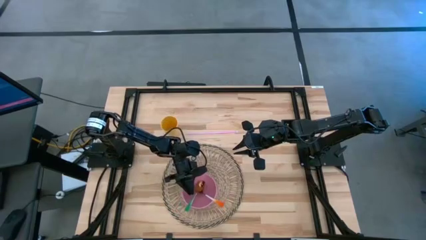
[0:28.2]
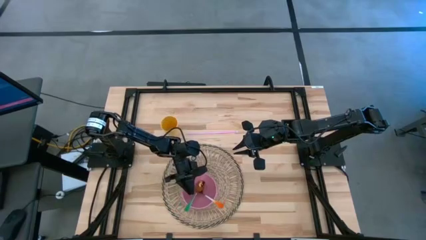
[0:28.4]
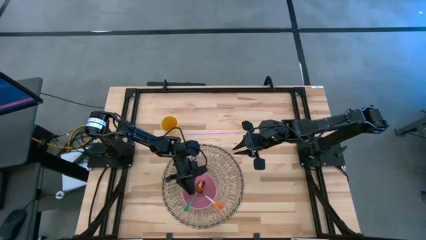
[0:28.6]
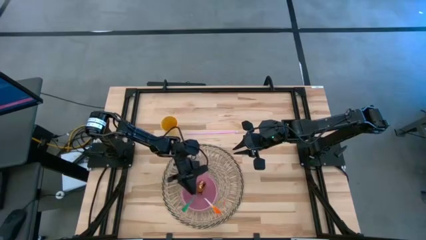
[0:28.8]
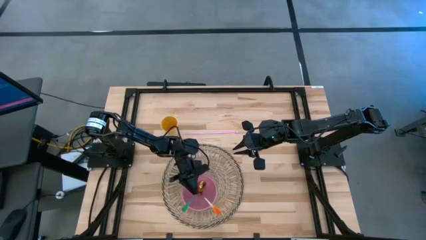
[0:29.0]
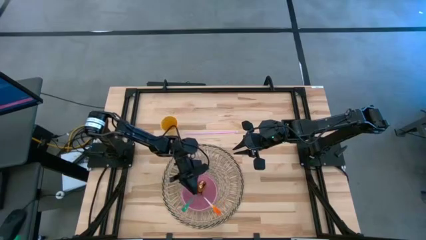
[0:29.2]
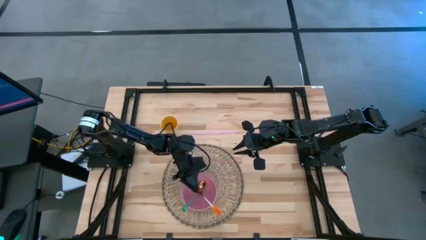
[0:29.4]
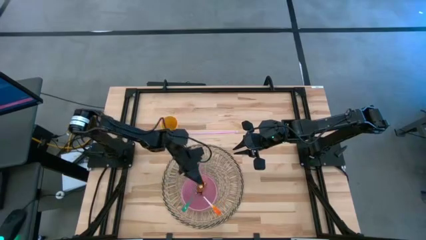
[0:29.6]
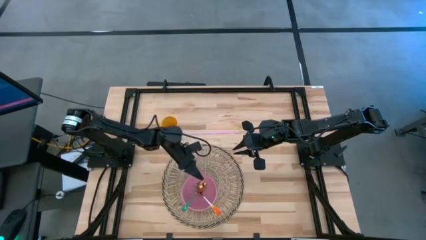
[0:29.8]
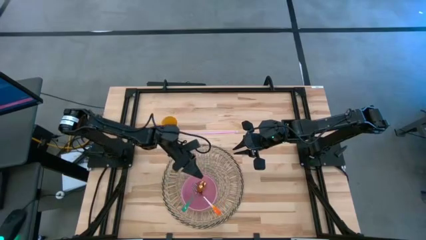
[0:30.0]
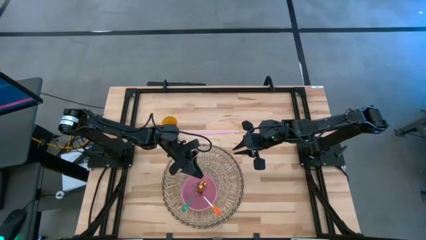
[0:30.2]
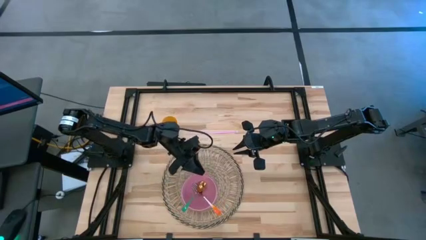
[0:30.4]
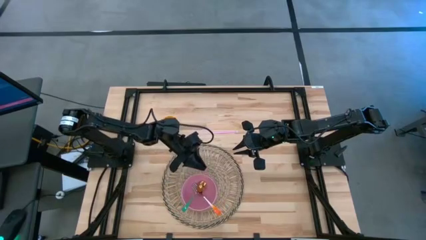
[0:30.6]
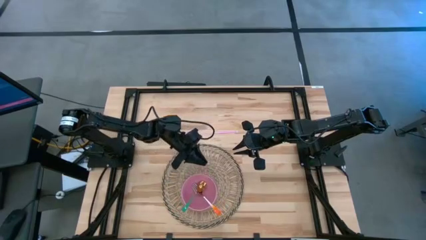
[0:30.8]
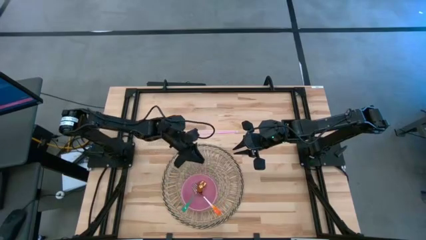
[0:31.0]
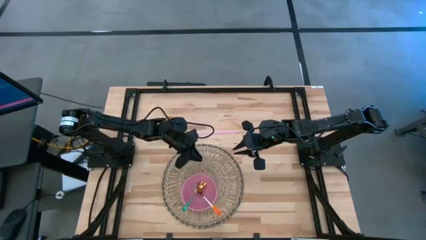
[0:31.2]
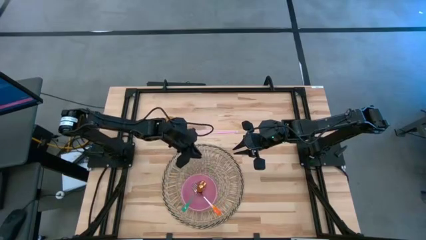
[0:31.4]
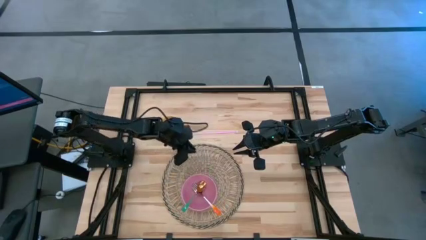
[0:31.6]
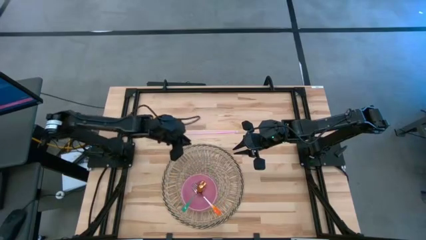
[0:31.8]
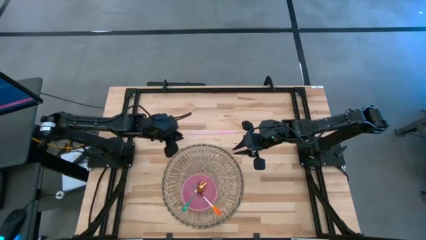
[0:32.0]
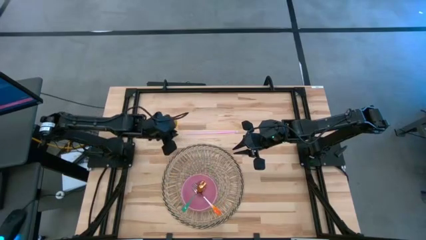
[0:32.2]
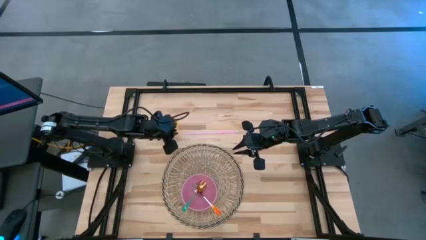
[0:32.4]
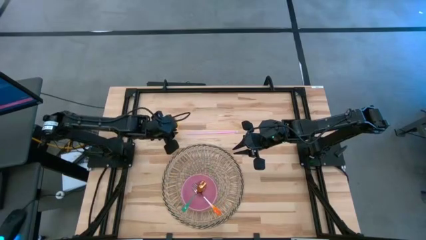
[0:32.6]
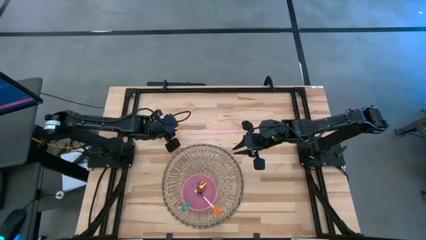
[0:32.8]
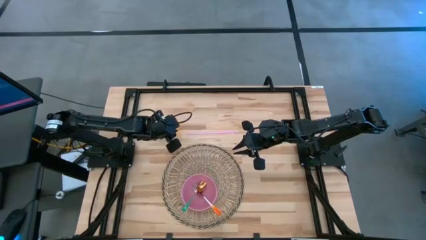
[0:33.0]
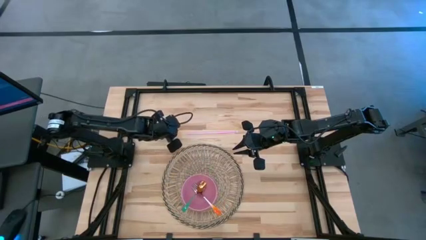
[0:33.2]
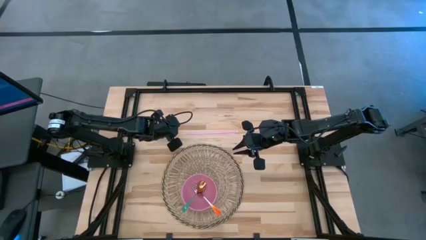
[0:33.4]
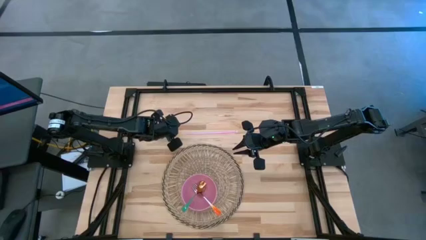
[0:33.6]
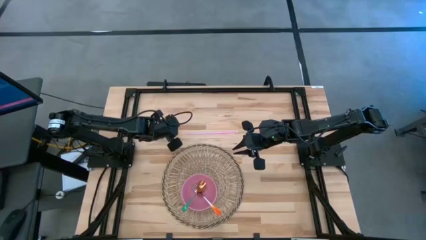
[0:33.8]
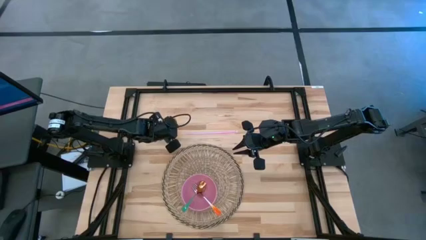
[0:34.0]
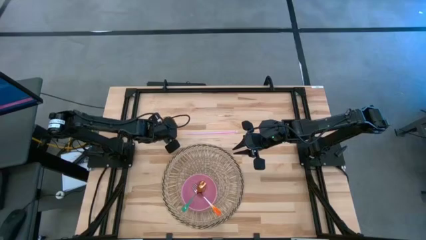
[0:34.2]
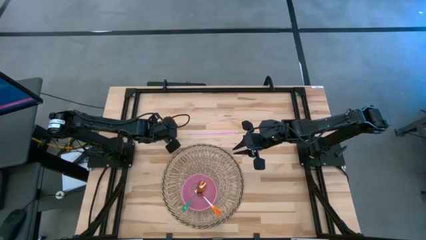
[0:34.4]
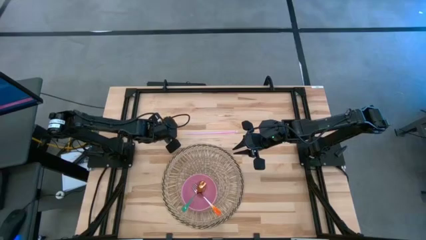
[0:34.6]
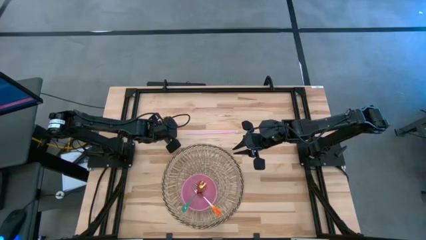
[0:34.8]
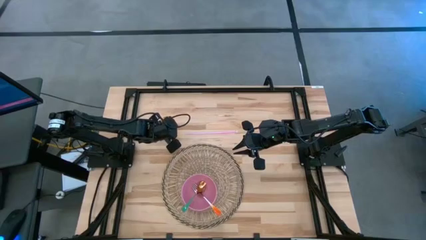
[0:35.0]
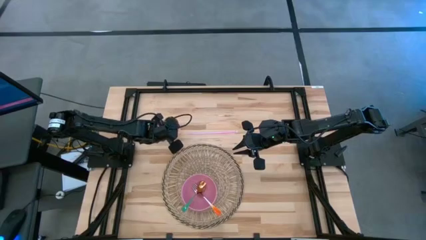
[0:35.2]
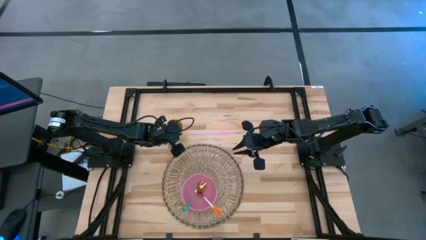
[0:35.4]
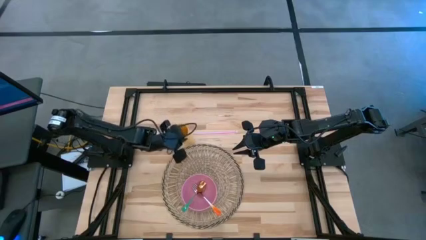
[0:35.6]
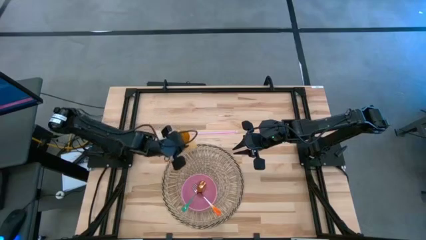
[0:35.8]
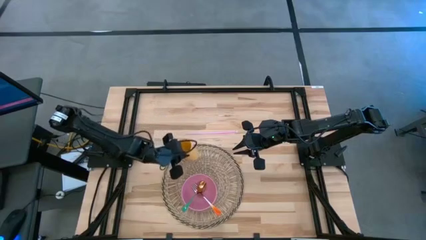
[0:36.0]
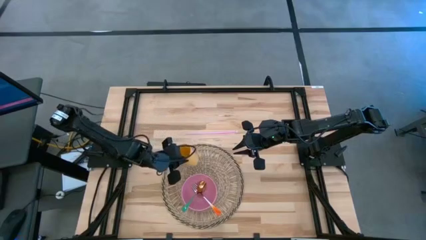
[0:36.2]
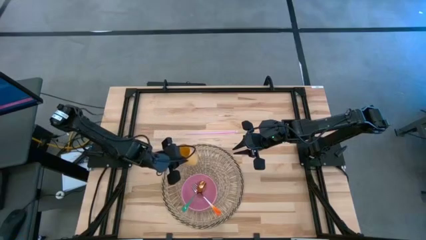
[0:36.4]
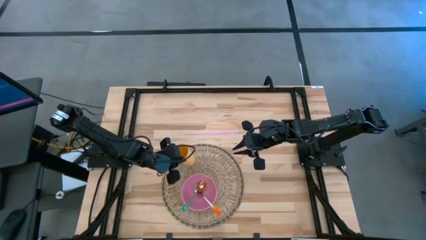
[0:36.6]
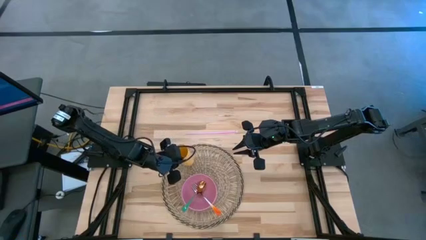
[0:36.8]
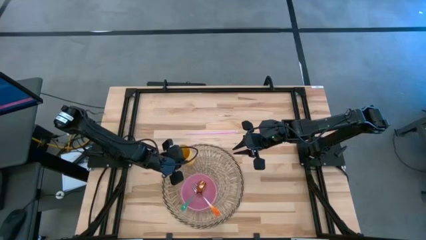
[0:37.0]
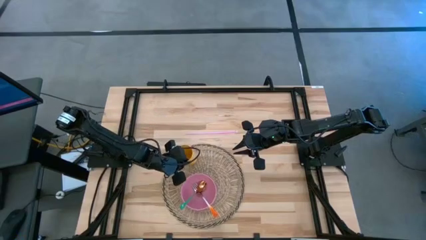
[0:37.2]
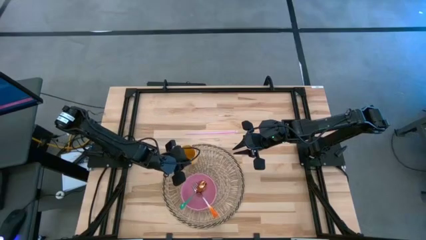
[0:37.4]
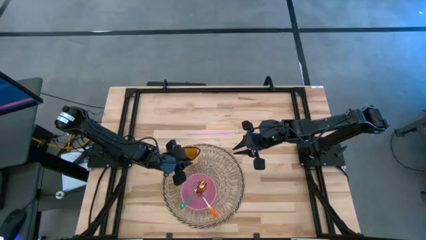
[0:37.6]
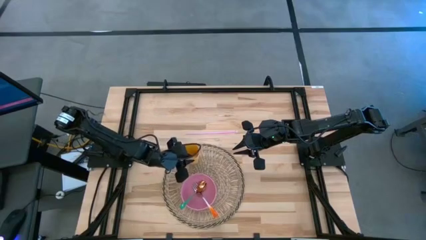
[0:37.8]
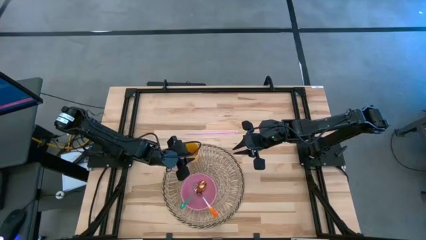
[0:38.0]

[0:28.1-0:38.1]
Task: Pick & Place Utensil
Put the yellow cup on the brown mat above the pink bowl
